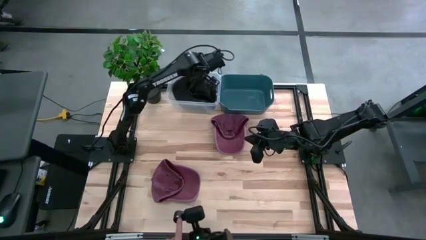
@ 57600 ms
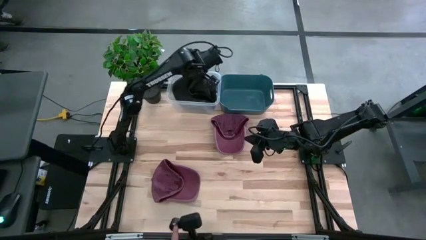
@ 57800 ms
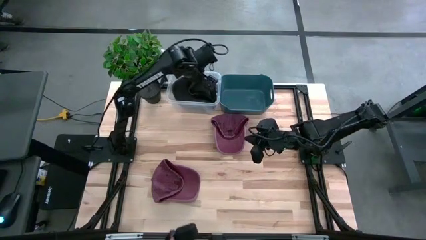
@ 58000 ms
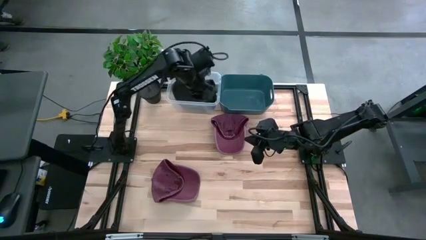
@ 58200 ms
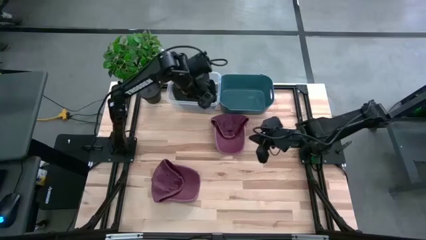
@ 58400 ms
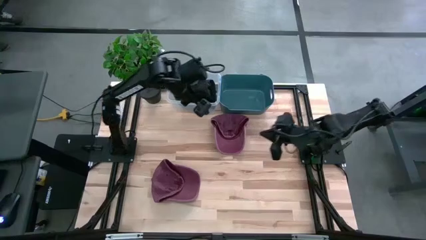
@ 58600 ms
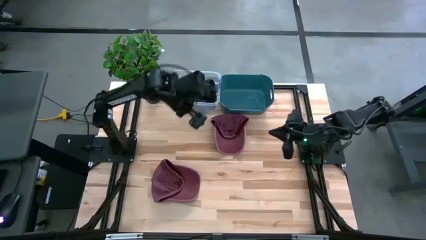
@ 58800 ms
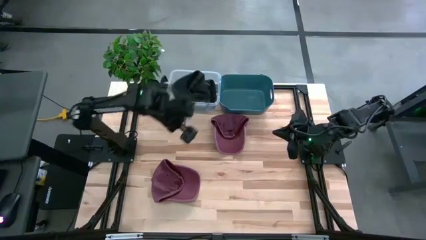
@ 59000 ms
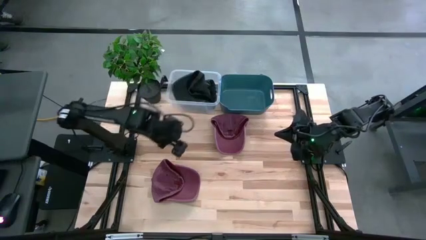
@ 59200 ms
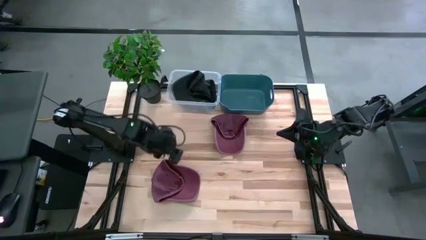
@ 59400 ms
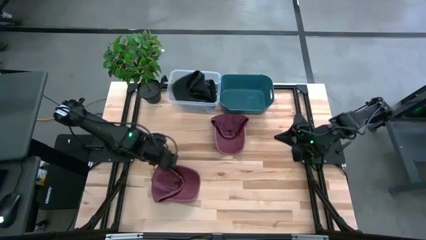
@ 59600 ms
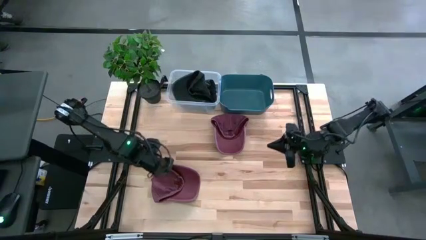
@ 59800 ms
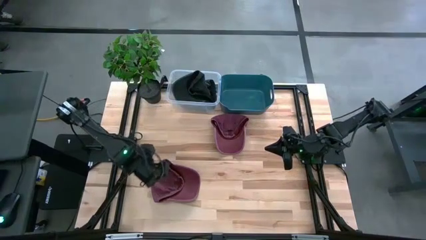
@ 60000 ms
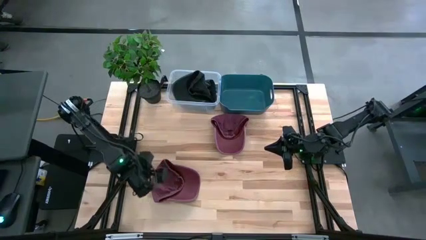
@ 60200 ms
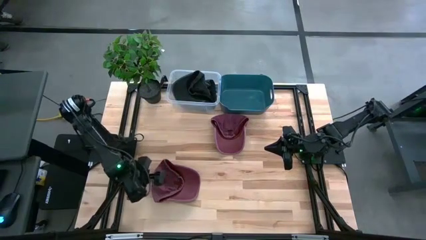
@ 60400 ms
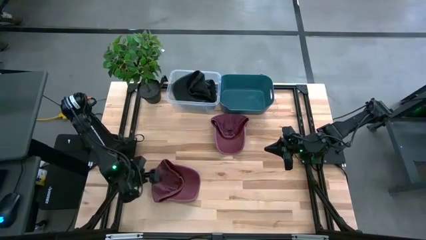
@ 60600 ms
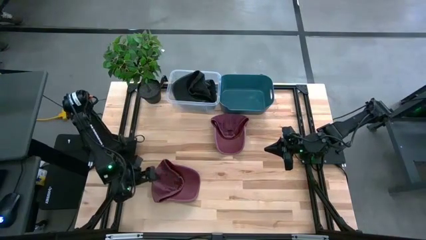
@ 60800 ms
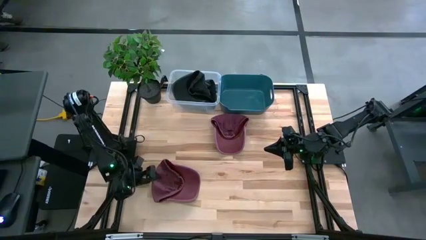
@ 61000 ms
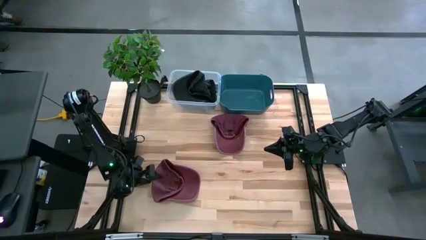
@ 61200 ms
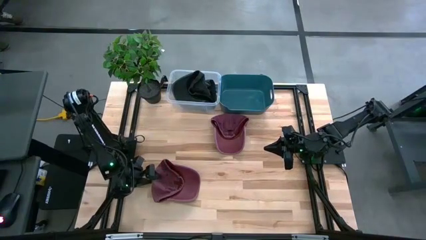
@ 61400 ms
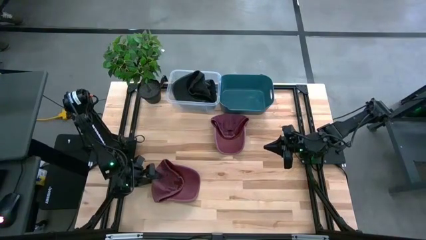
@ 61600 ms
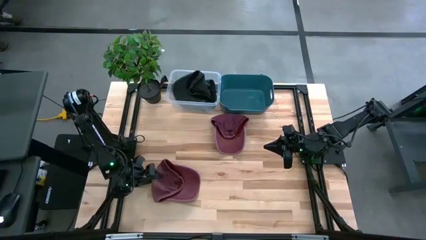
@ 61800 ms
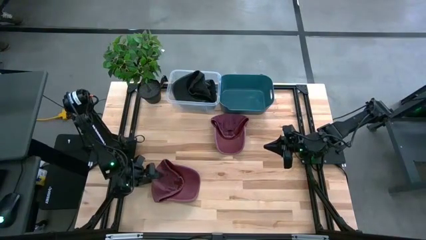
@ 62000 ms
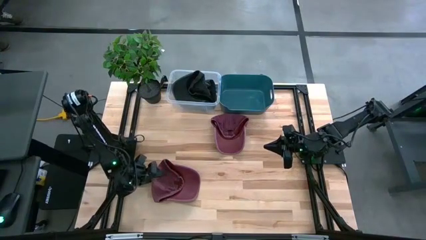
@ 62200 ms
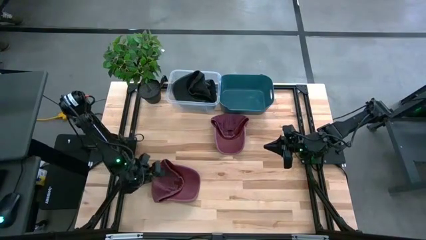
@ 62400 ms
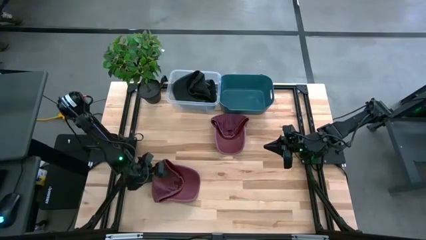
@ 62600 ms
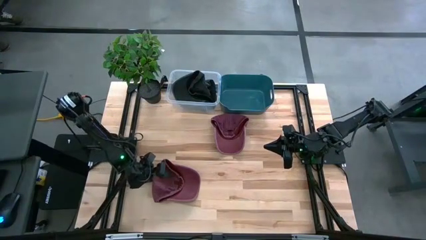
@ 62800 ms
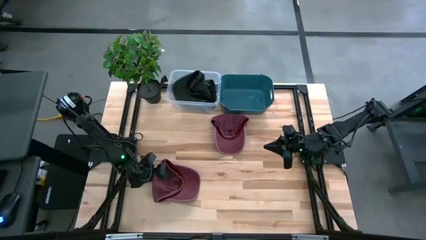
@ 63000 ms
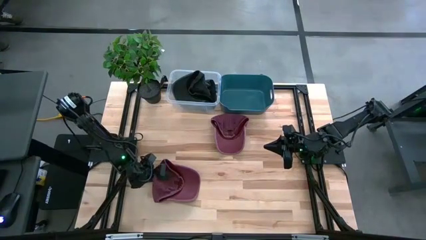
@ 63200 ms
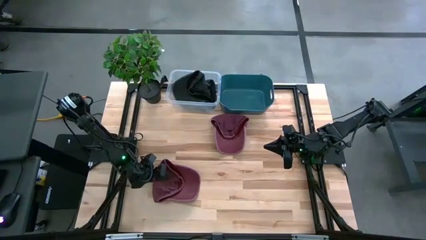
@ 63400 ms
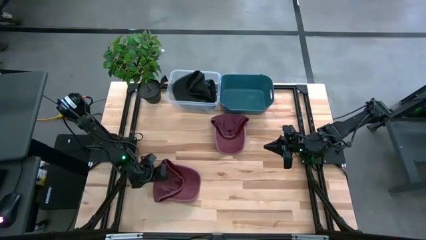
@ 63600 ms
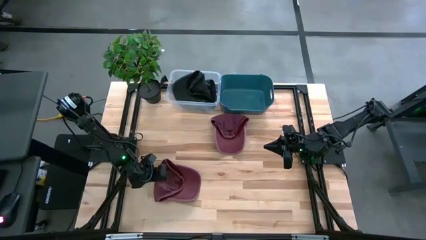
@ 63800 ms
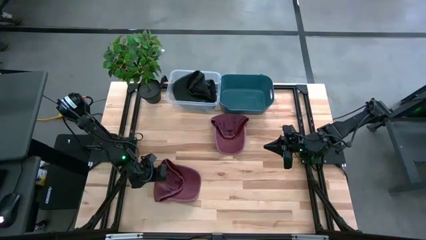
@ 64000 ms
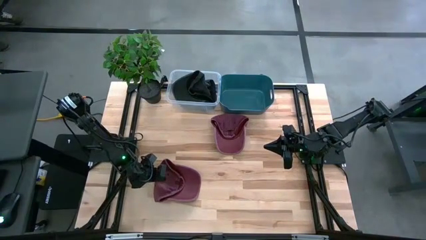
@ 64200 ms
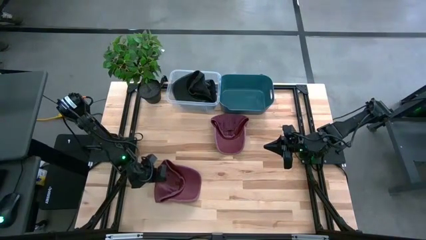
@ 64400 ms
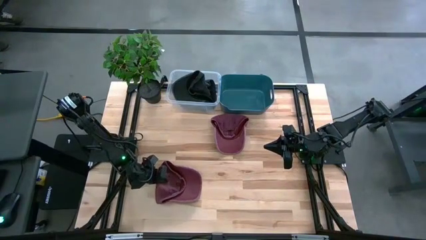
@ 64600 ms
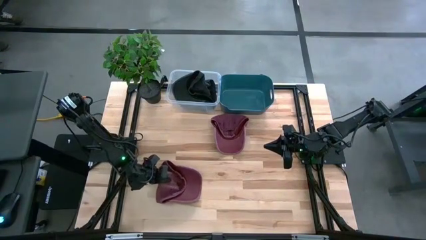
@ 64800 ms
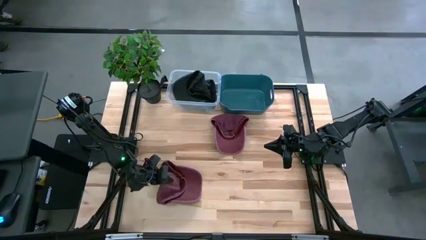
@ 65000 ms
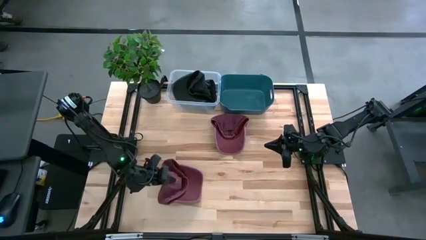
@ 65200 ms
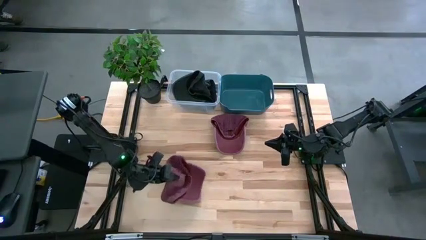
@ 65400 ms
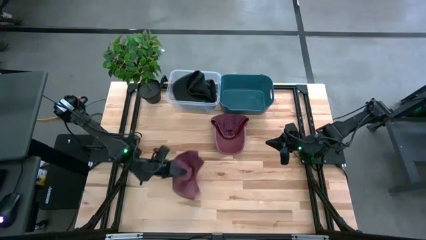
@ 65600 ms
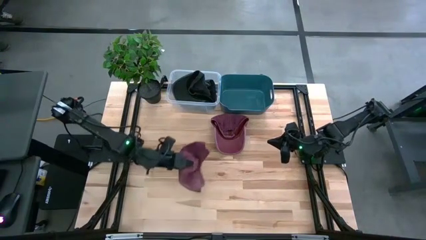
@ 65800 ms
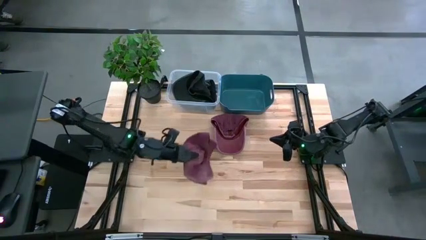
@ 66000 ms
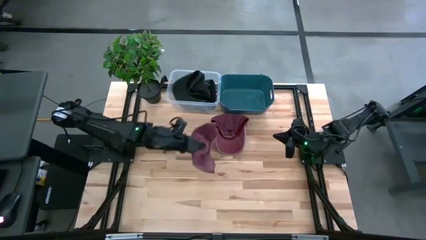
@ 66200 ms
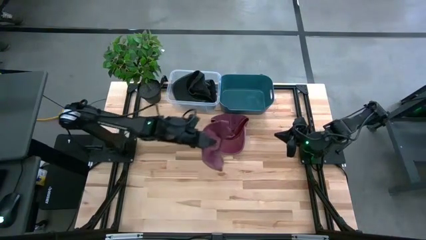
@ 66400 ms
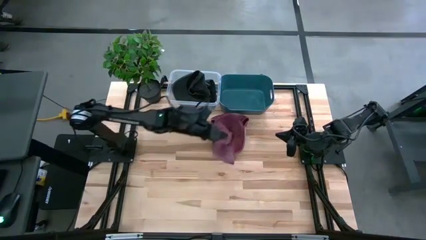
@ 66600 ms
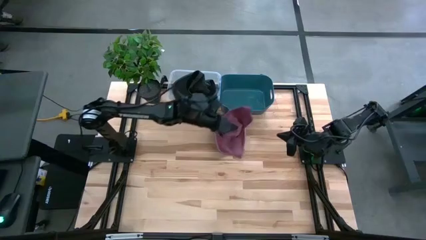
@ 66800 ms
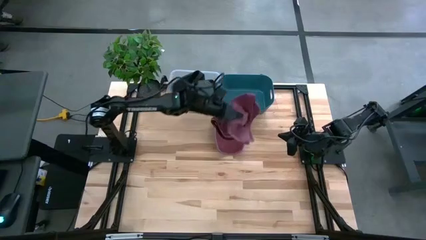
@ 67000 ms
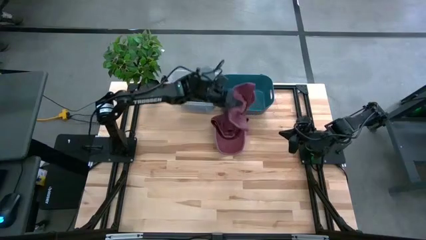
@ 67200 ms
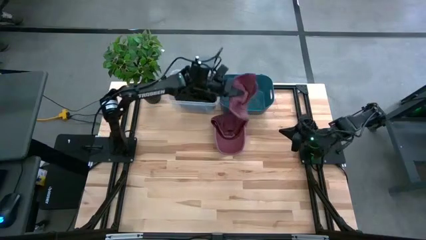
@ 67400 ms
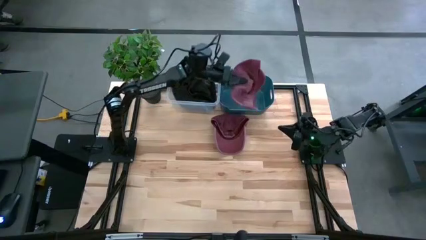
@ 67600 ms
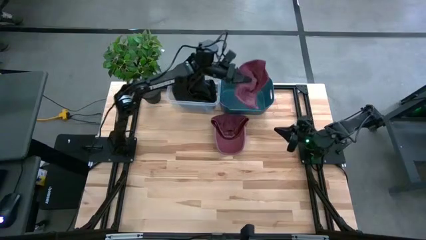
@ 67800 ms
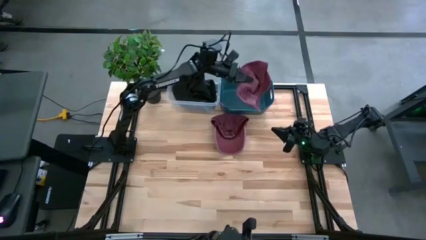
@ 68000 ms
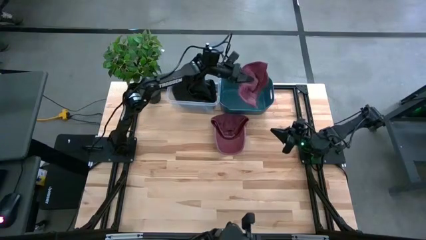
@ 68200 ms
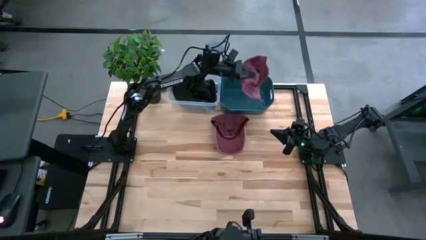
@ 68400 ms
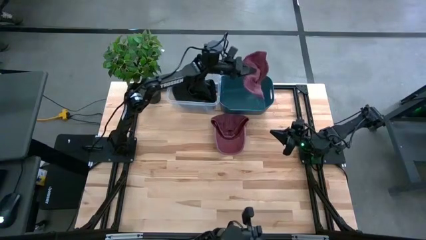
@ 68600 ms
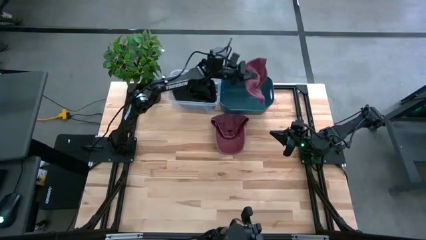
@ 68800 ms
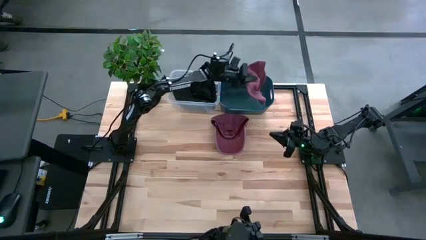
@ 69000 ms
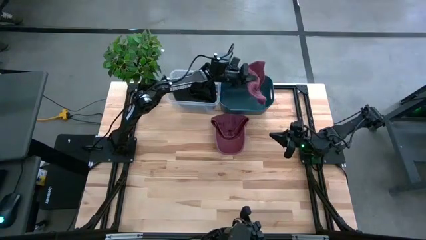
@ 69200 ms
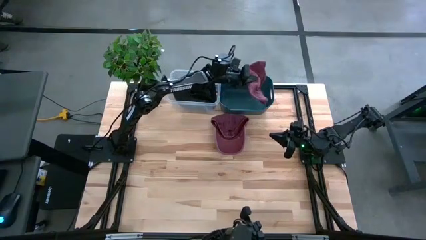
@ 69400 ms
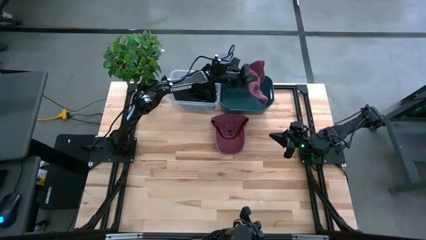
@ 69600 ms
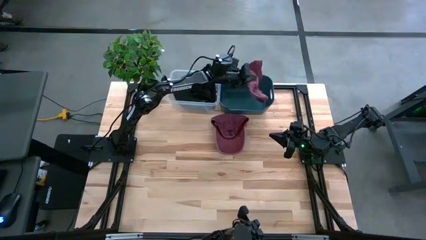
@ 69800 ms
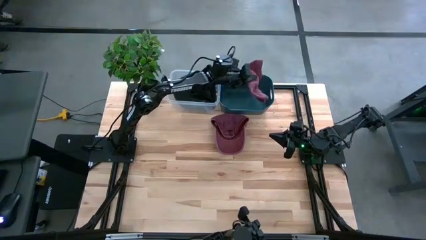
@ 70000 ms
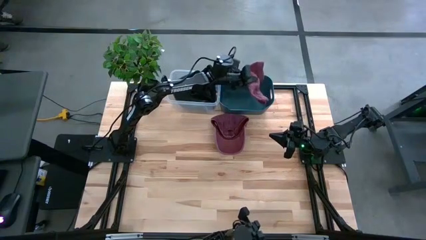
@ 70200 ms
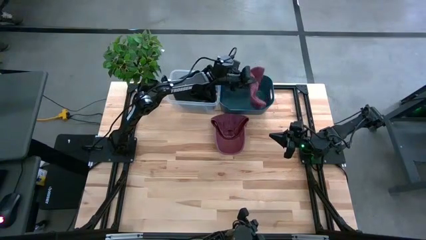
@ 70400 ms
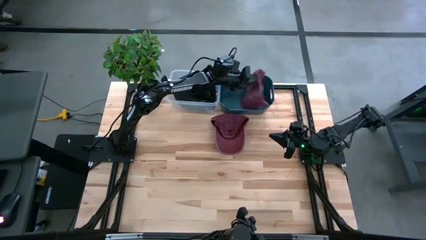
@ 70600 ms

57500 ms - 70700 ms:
Task: Pick & Place hat
Put the bottom red cap into the blue bin

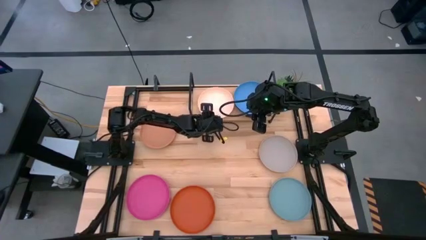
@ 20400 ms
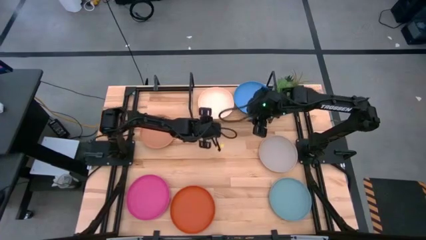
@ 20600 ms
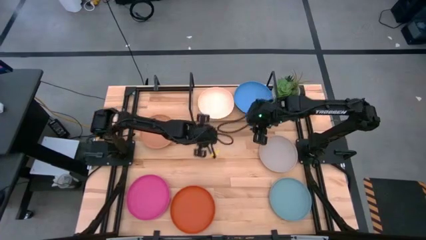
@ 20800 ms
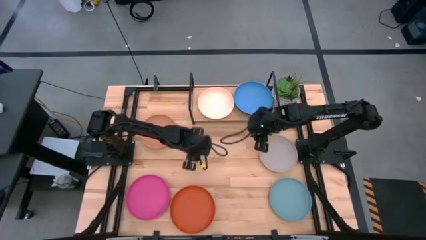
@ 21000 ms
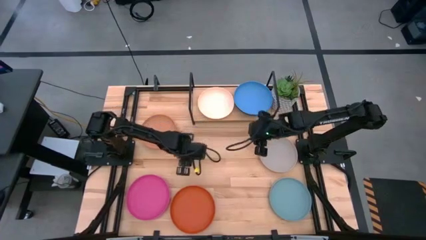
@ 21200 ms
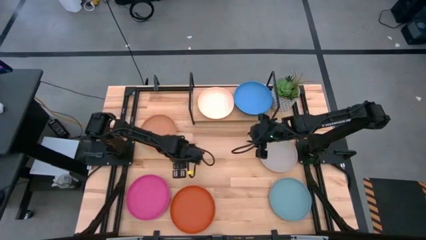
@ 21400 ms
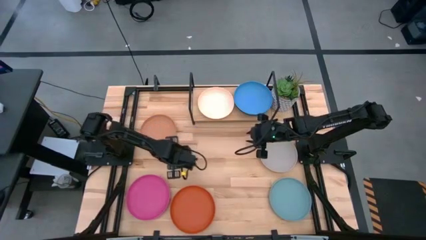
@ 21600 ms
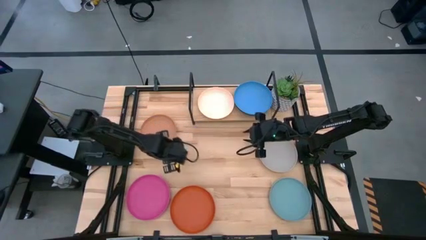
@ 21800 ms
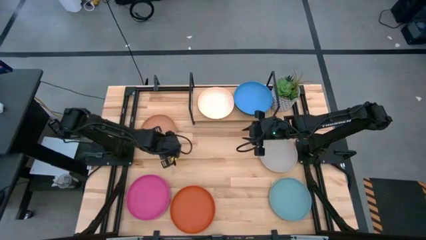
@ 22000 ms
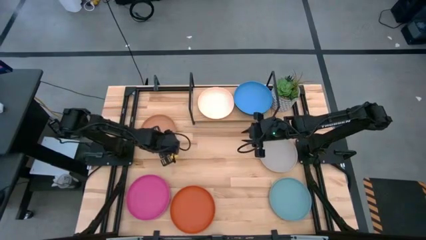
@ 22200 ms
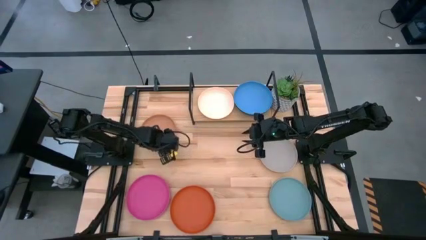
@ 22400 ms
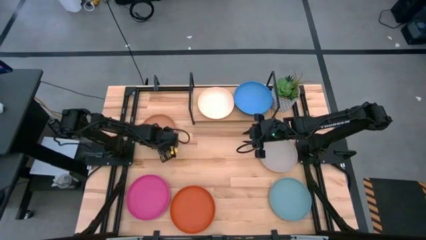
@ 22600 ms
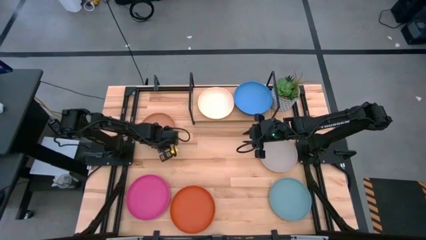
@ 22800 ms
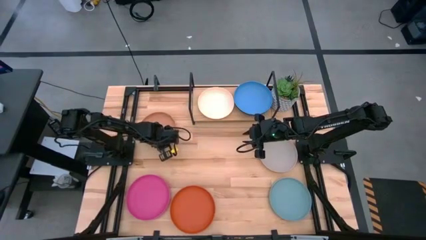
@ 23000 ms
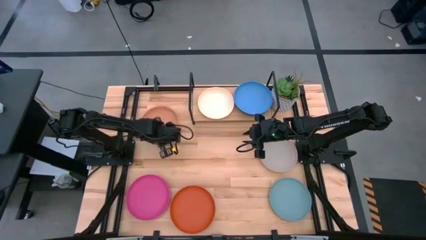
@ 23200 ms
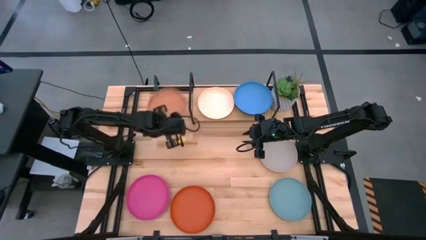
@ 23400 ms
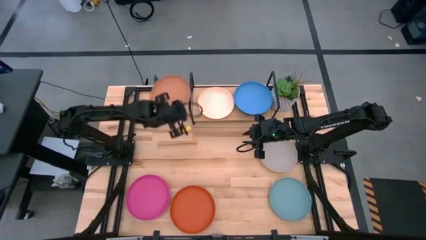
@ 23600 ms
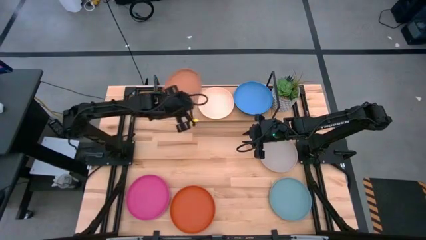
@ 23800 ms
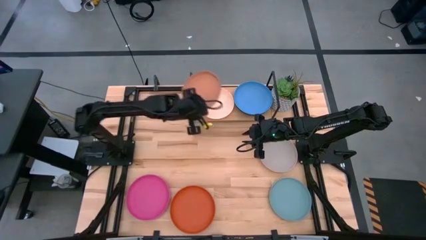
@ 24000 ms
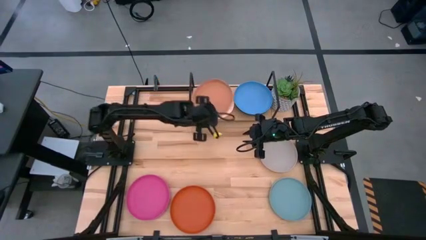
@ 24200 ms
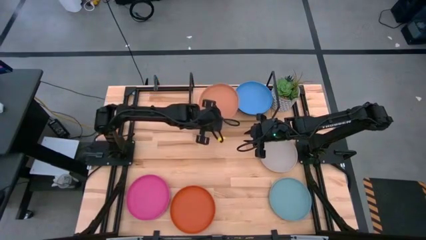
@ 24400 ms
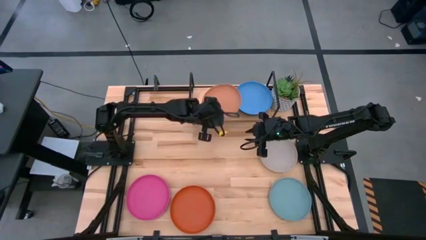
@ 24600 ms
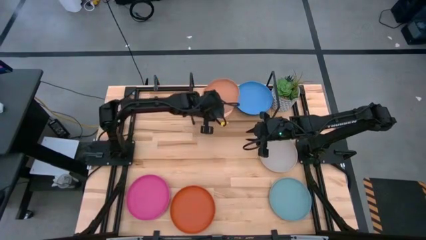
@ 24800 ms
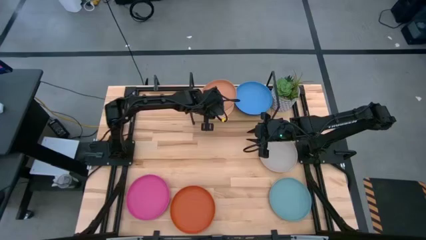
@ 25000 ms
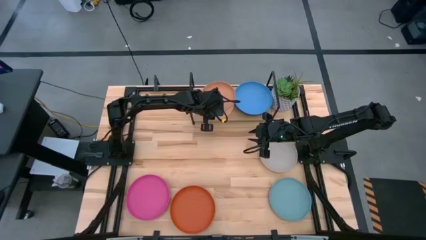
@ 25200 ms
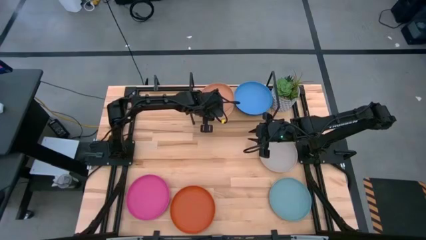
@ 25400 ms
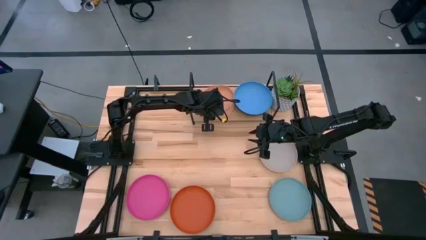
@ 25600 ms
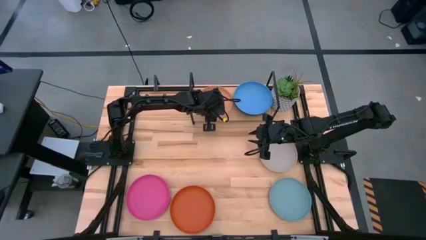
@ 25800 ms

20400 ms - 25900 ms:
Task: Place and stack plates onto a shelf
Stack the brown plate on top of the light orange plate on the shelf
